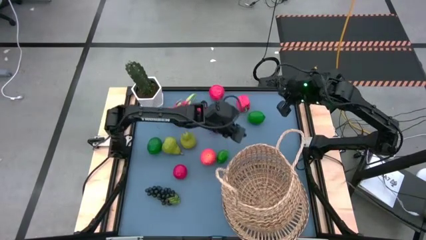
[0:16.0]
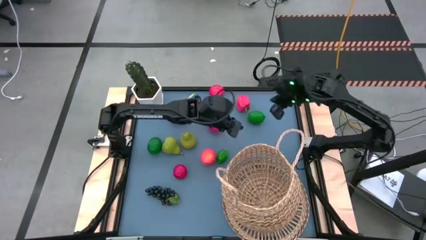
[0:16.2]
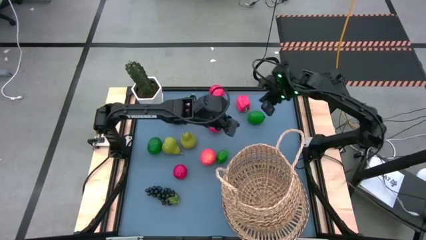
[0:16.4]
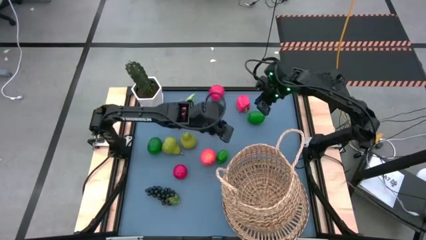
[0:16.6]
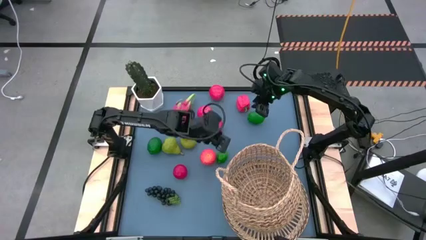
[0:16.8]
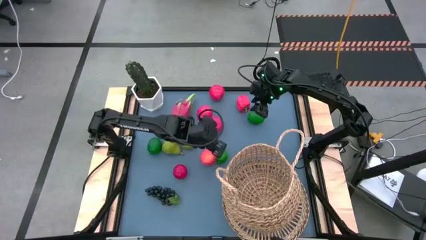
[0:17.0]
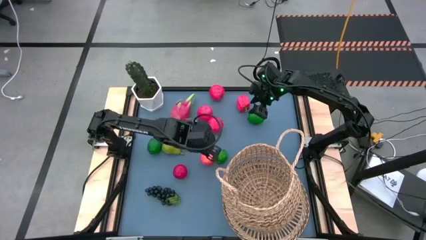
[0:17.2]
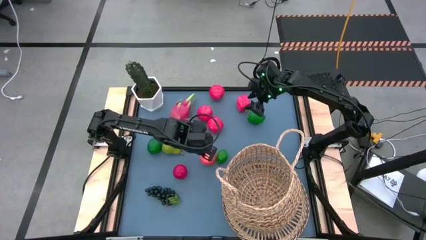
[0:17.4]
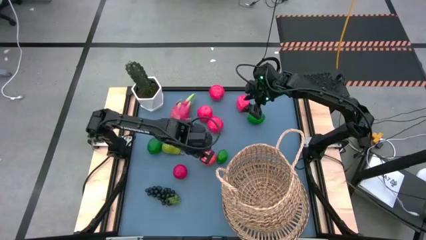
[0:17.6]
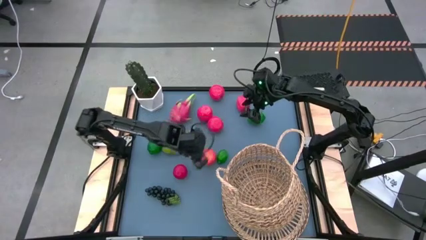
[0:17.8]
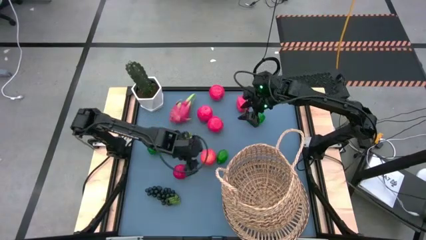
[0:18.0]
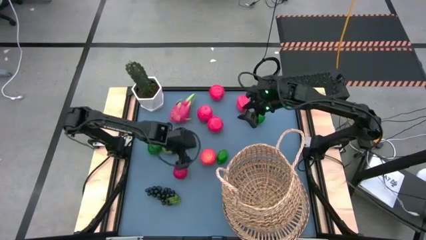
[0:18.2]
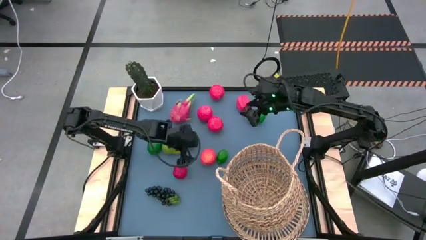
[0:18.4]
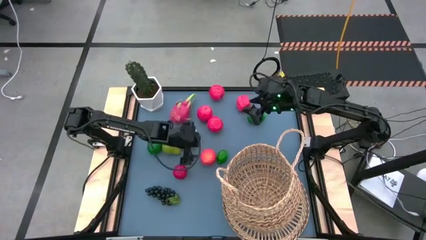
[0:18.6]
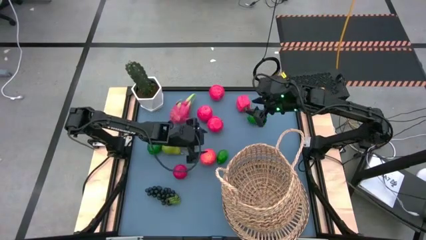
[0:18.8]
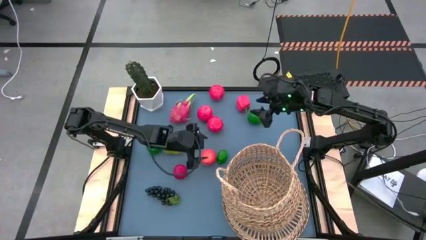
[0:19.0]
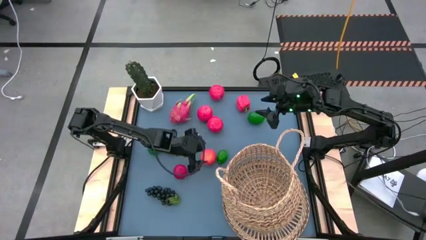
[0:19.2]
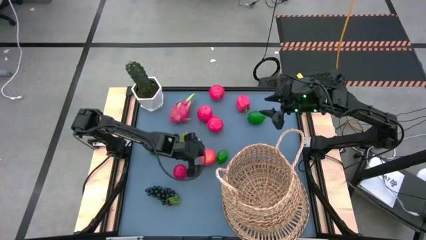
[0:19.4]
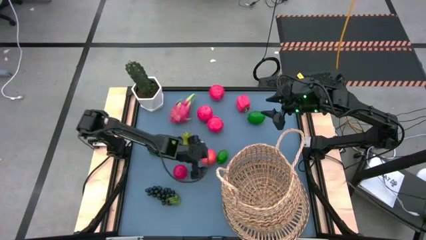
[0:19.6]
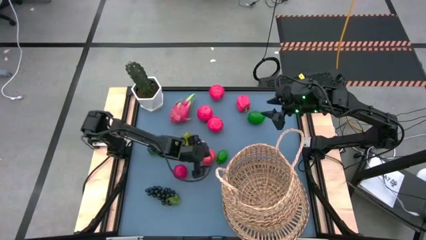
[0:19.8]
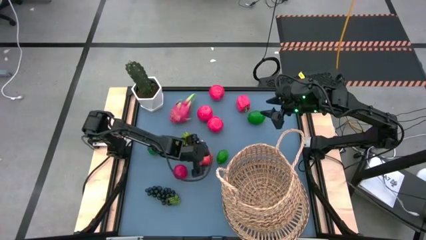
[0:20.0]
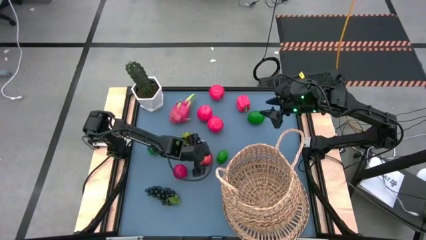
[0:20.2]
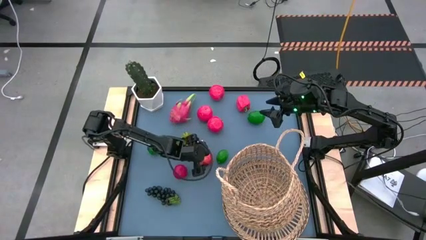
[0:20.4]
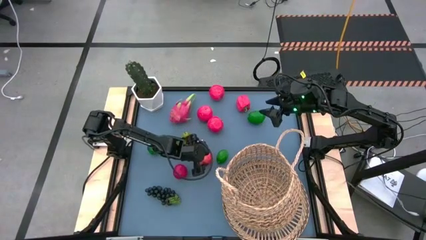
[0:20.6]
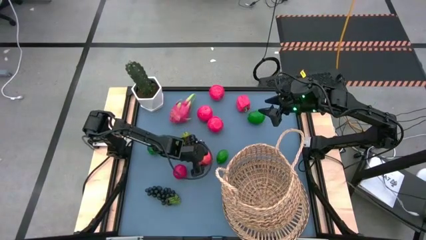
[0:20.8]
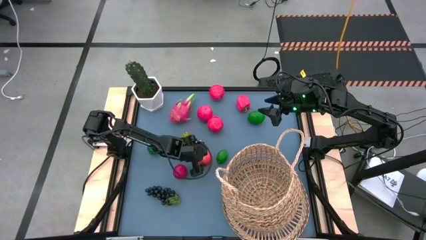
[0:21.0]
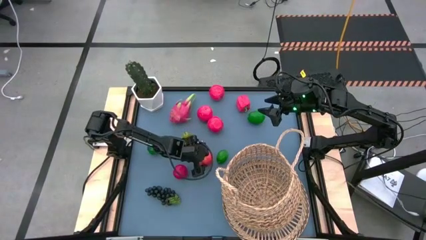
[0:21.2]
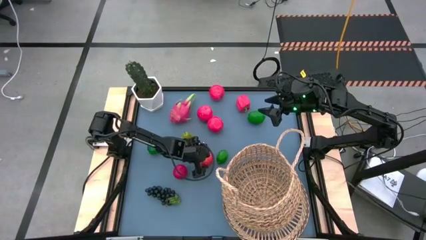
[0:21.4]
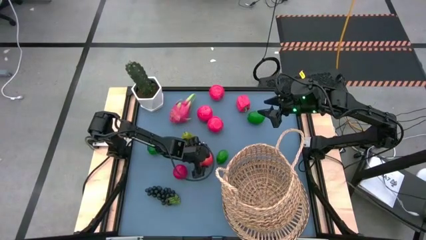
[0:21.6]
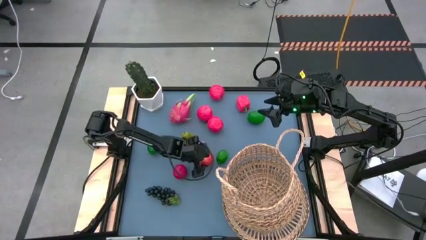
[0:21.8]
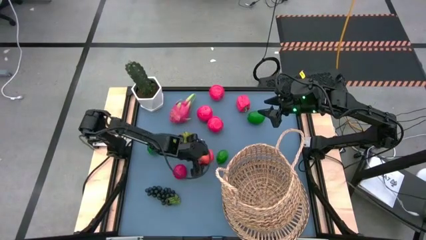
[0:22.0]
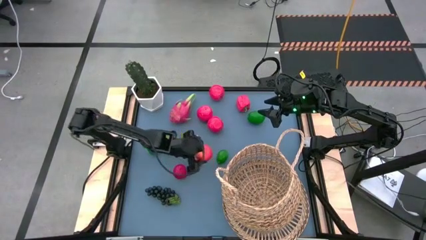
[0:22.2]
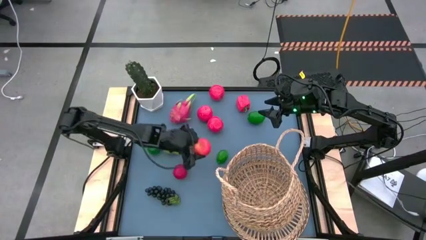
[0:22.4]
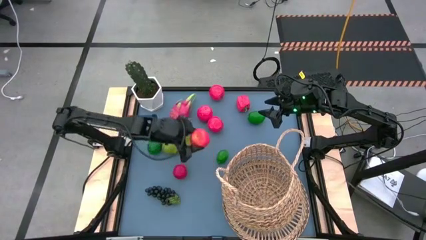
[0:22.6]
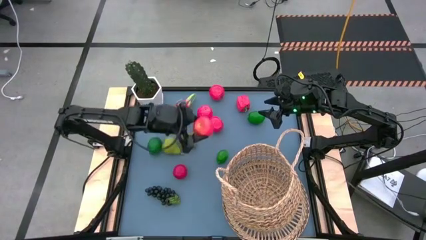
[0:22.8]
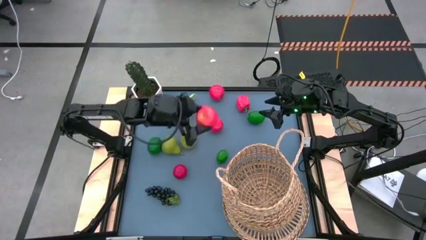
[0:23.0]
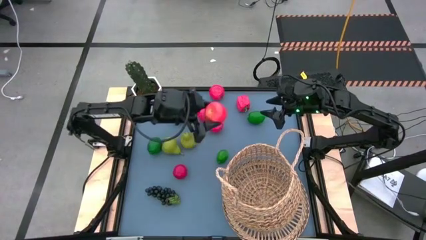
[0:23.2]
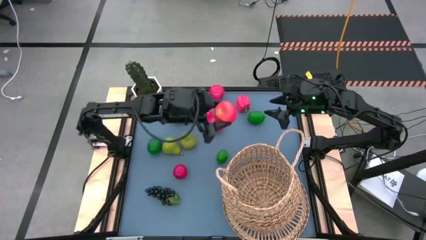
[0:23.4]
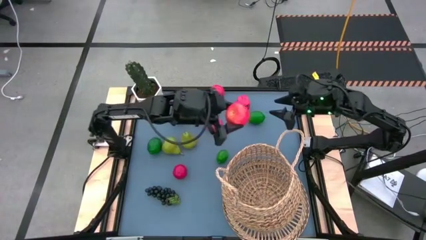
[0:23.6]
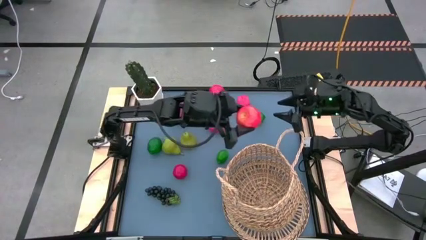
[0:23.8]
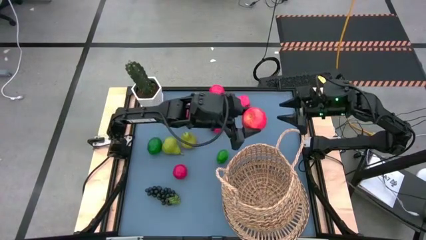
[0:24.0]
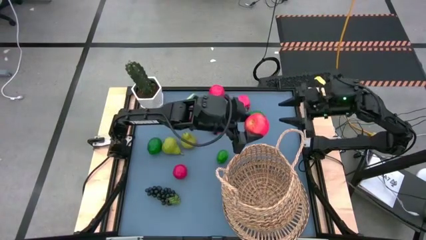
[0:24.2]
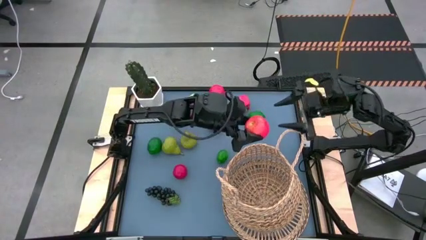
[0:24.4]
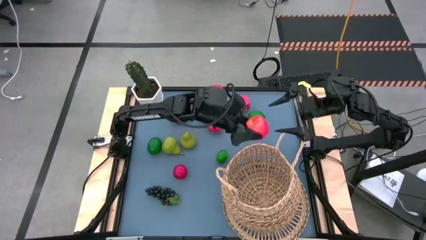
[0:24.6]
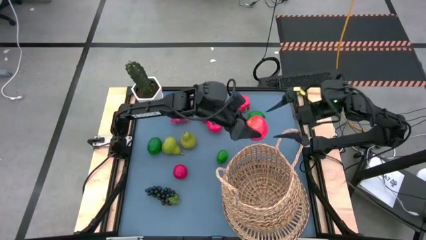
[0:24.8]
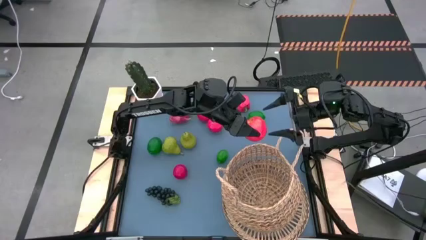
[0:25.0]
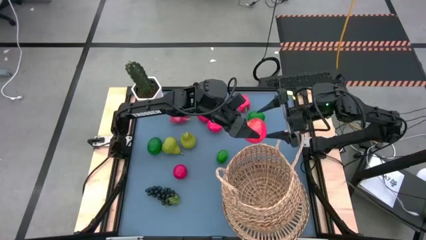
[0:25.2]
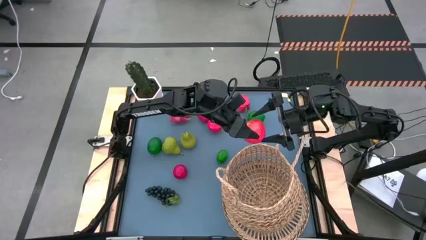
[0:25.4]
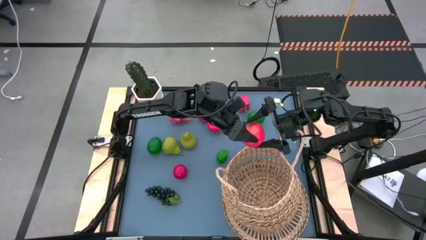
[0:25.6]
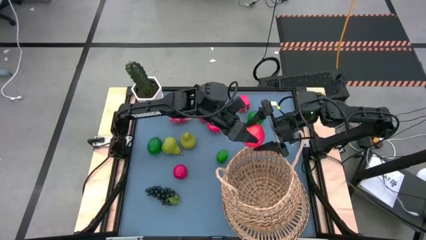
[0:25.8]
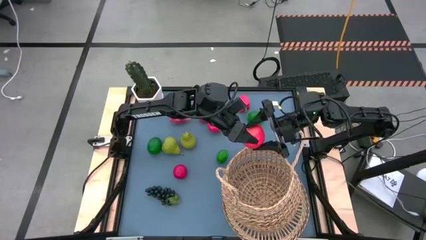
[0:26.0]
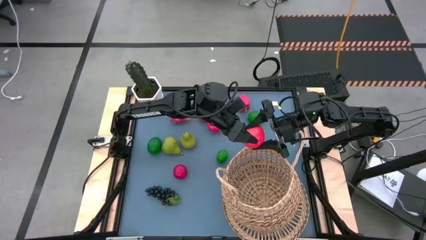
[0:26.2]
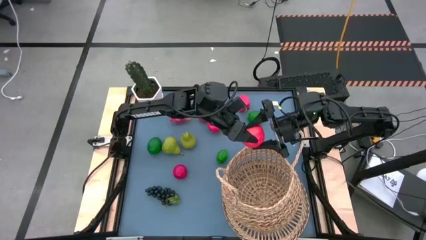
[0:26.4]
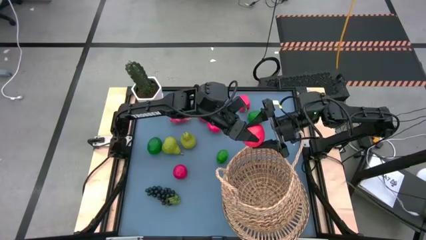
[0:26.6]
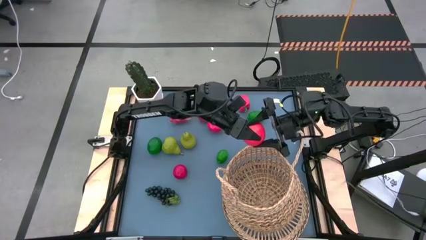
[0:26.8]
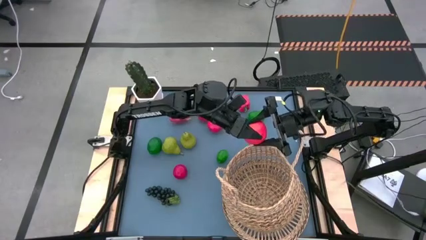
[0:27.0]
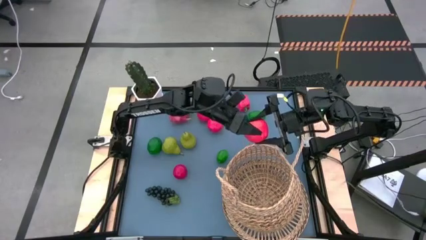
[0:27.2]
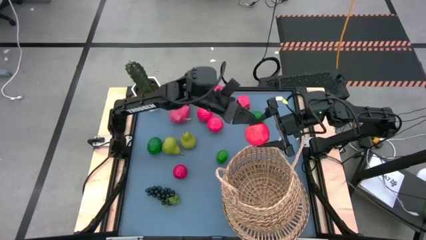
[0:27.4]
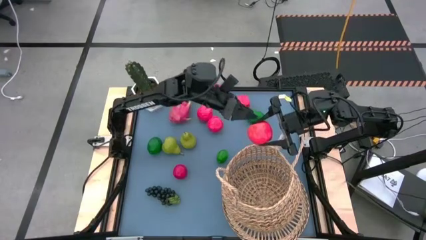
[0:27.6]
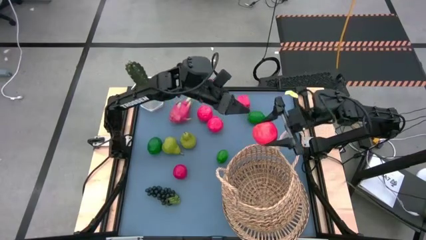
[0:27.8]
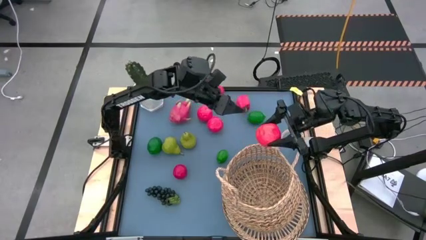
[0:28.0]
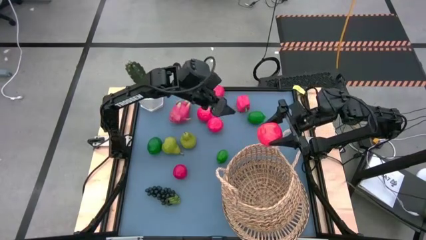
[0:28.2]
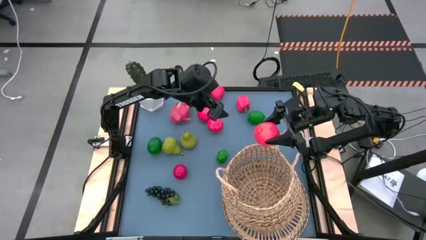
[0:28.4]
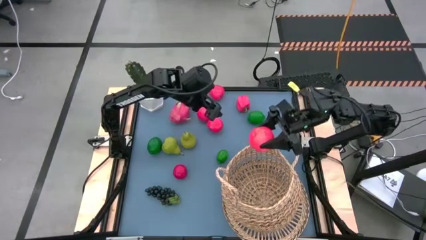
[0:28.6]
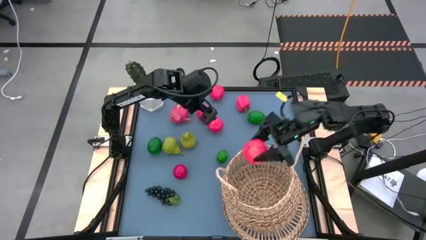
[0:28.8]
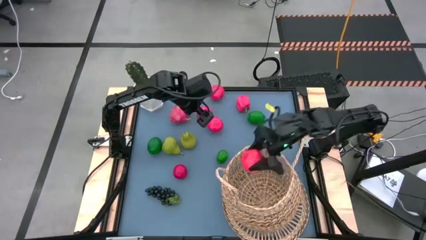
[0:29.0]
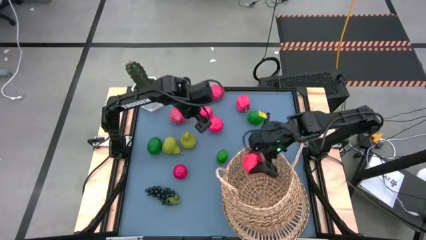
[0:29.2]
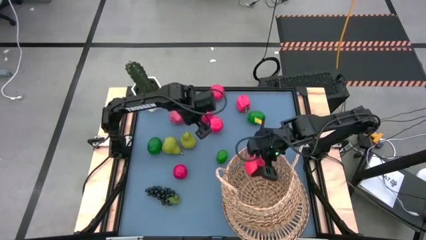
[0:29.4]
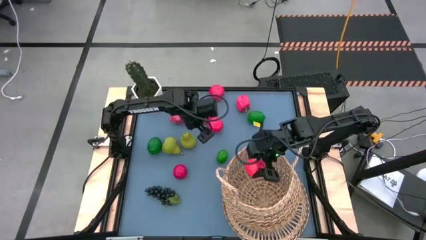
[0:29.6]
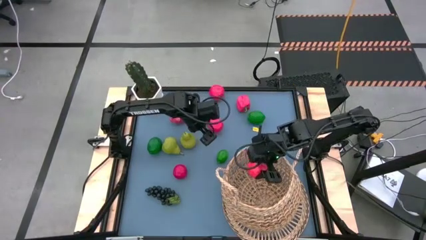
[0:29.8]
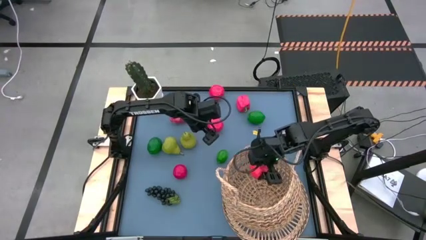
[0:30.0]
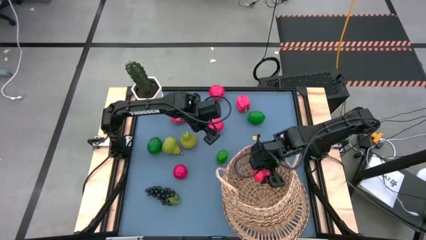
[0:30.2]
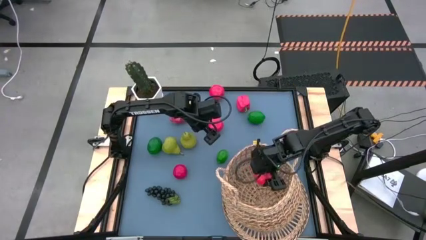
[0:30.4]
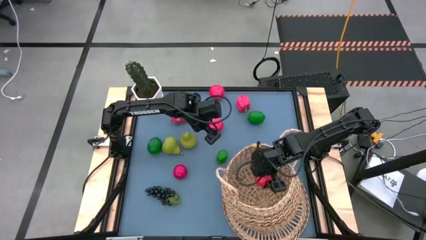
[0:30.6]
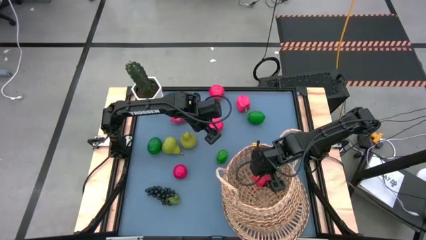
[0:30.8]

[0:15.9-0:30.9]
Task: Build produce basket
Put the red apple into the brown basket

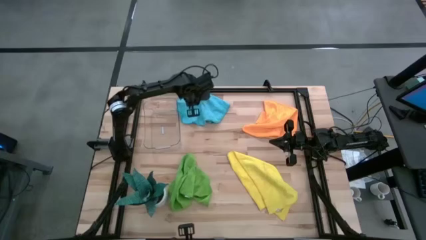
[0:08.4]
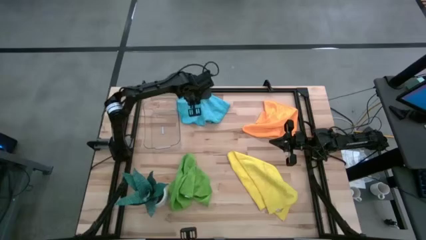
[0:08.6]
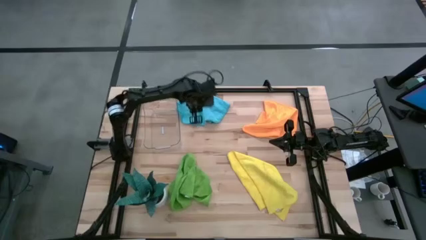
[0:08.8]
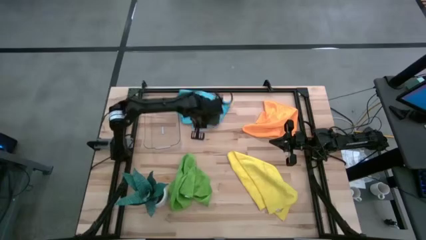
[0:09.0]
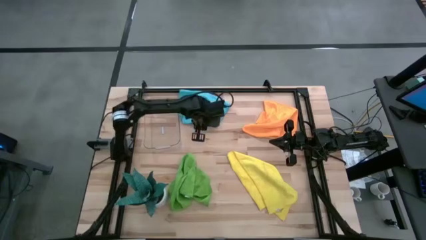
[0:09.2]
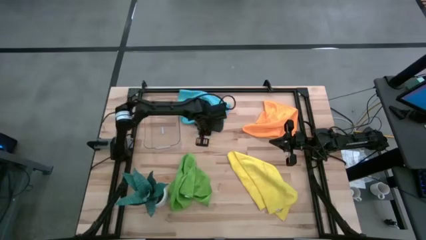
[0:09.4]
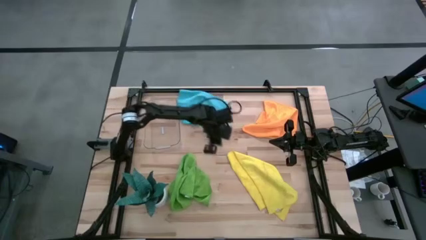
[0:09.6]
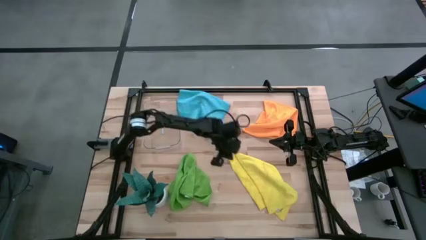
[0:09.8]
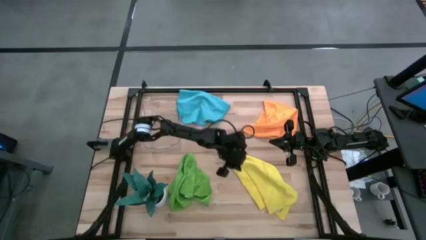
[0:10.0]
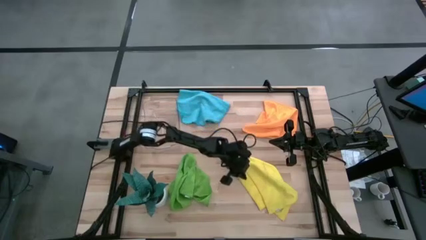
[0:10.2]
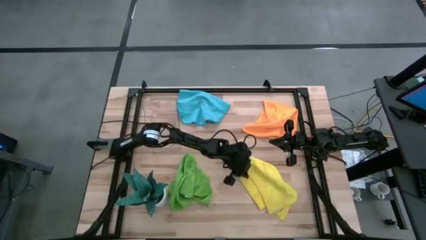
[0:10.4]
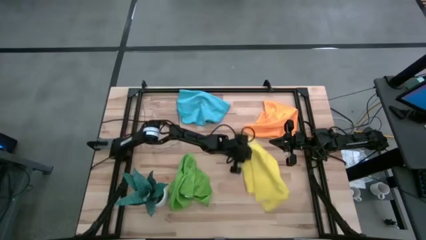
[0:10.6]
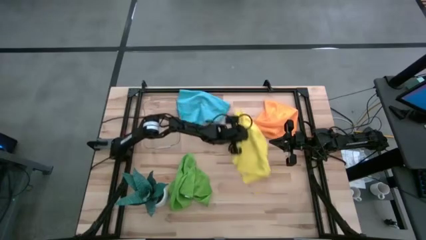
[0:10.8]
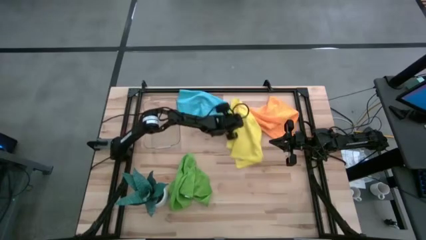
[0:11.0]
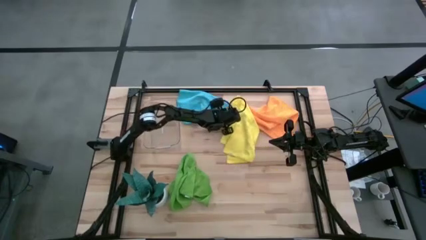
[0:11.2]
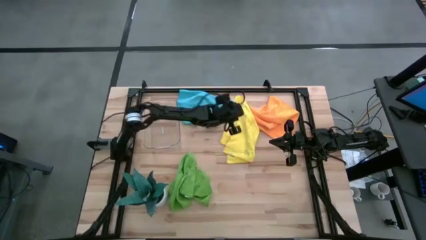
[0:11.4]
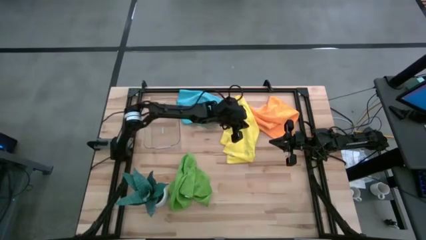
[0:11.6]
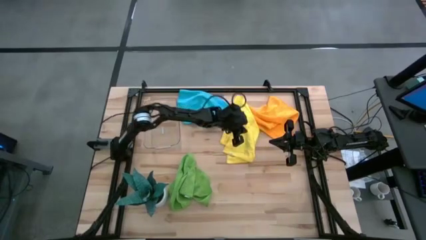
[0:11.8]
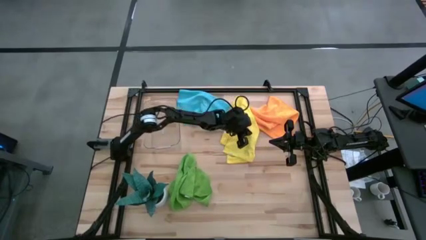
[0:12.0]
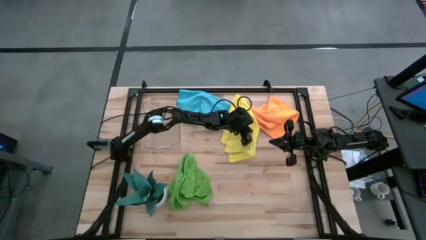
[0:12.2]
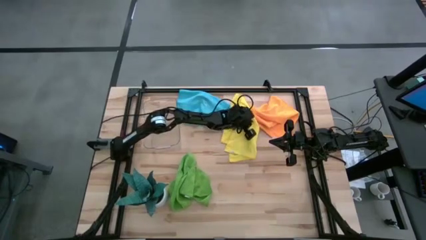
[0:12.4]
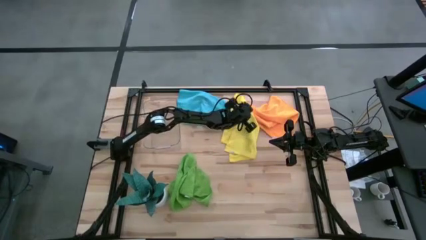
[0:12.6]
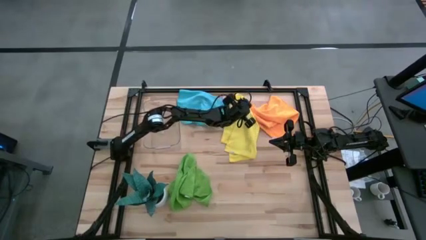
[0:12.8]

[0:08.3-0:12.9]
Task: Roll microfiber towels into tight, uniform cylinder then place into a basket
Move the yellow microfiber towel to the upper middle of the table
